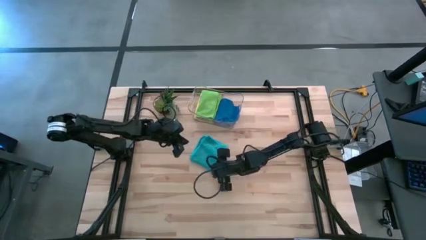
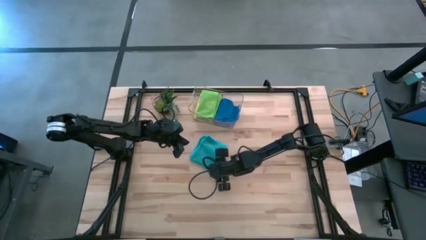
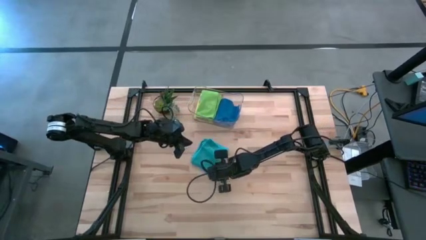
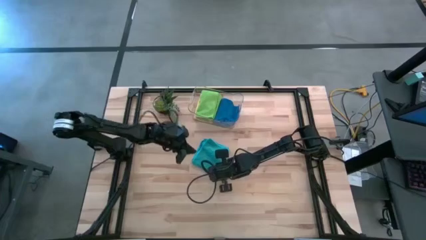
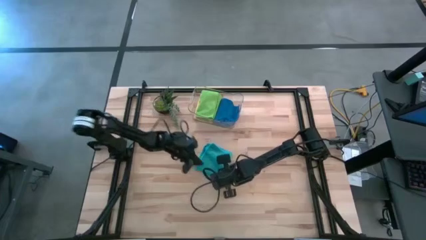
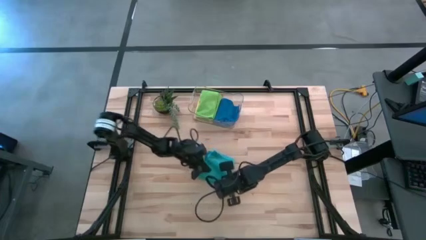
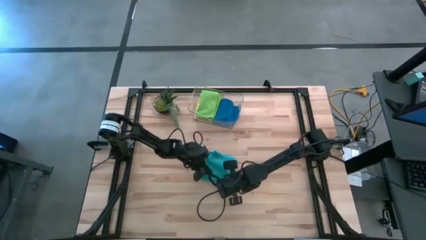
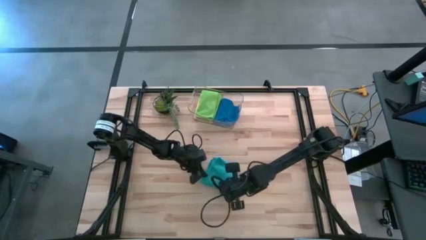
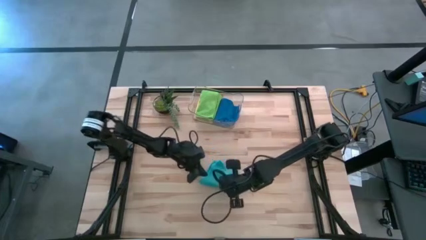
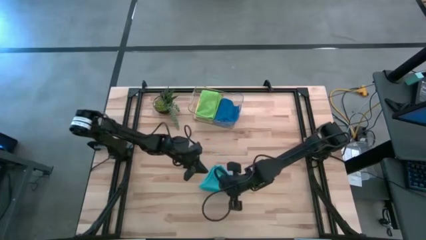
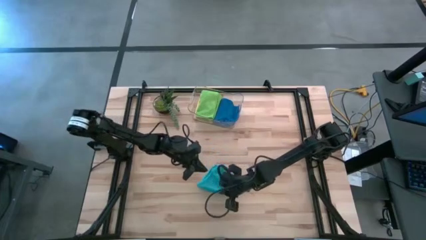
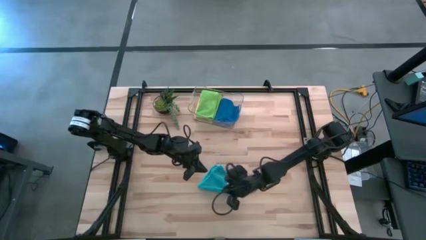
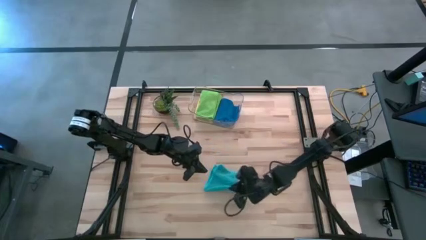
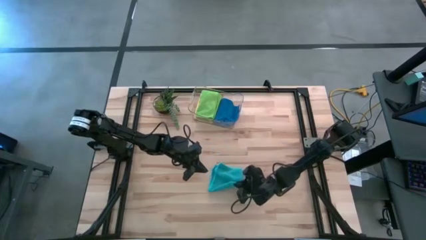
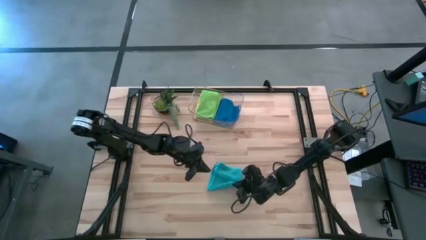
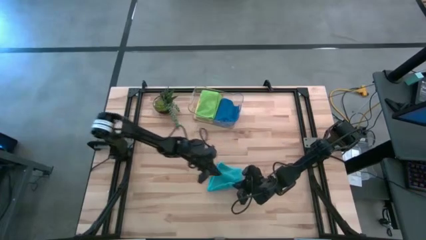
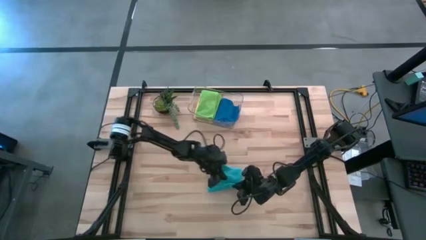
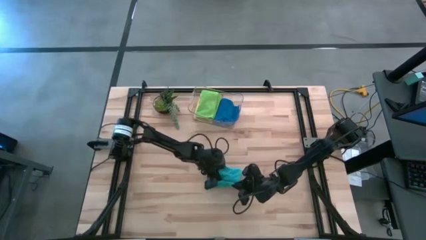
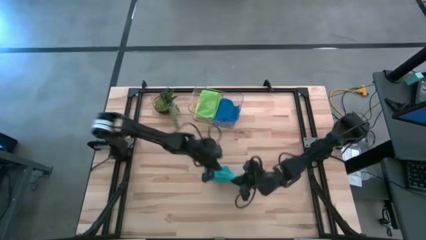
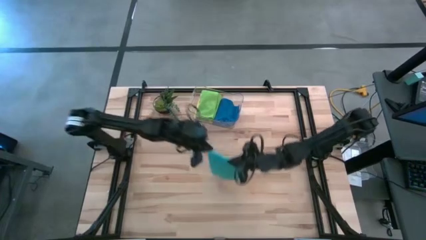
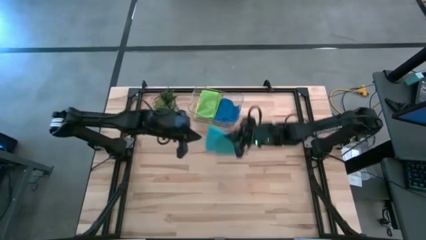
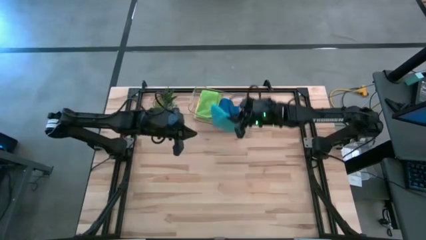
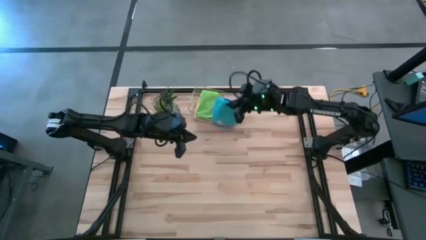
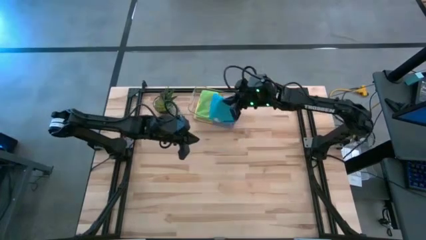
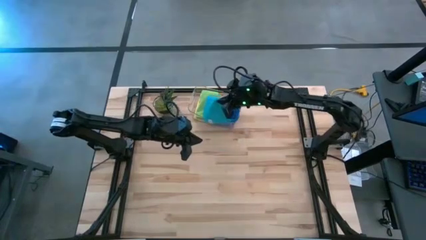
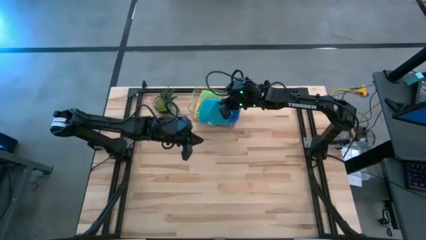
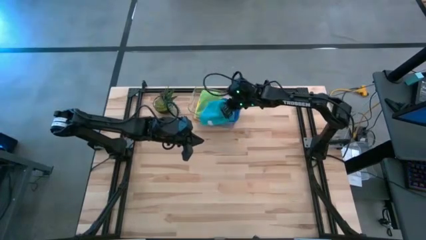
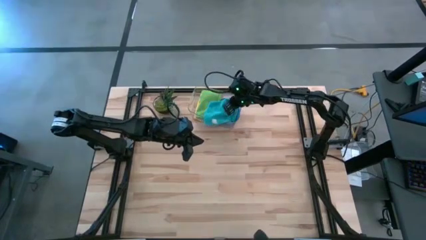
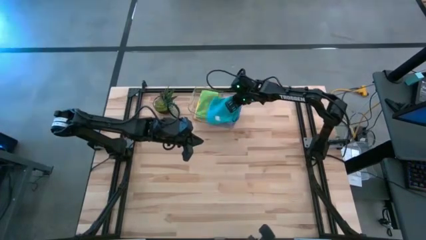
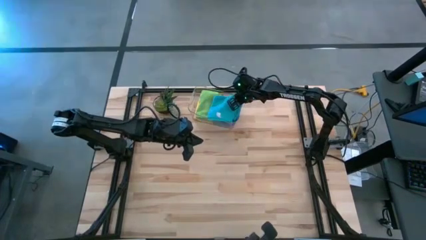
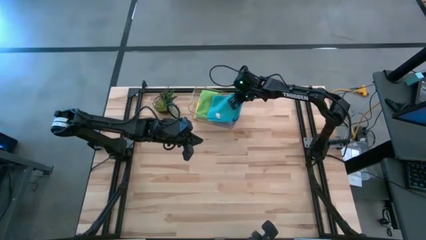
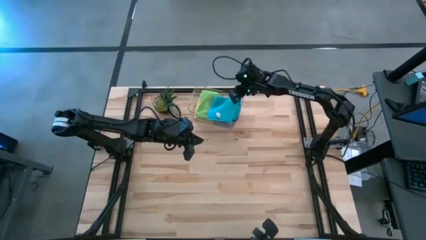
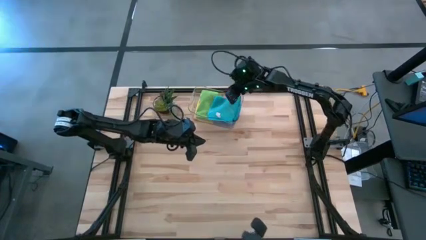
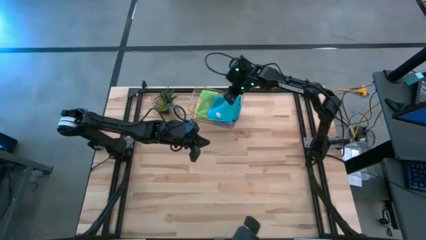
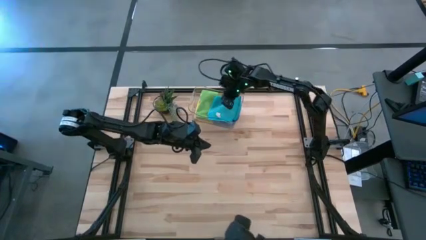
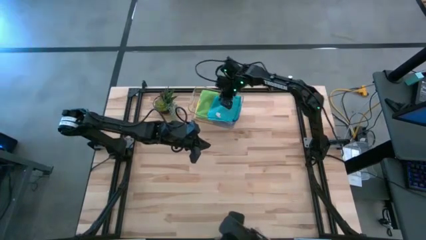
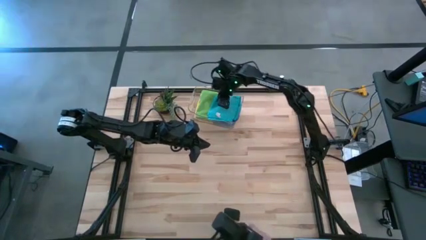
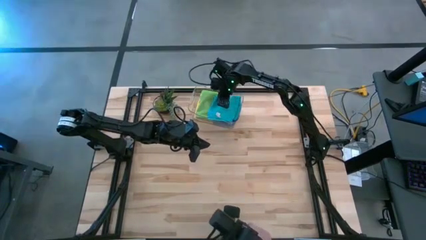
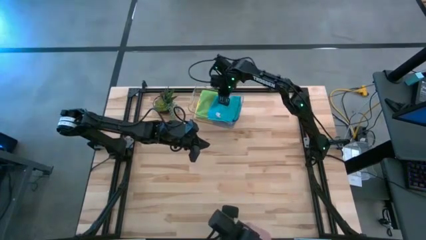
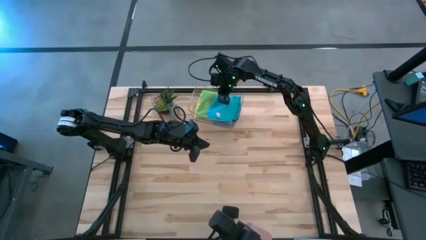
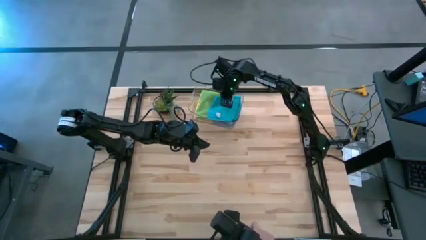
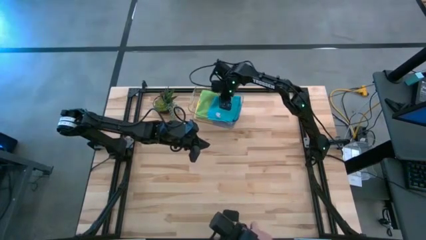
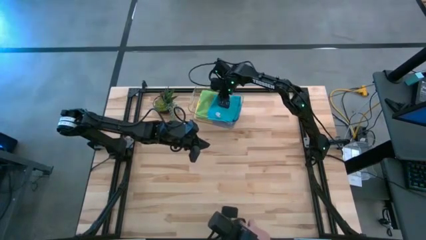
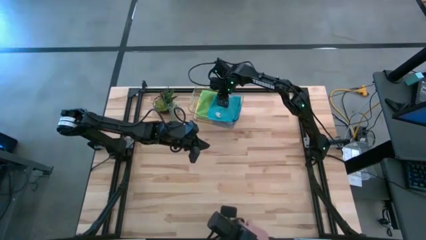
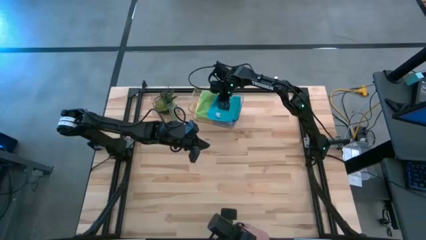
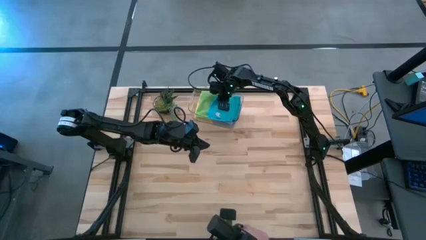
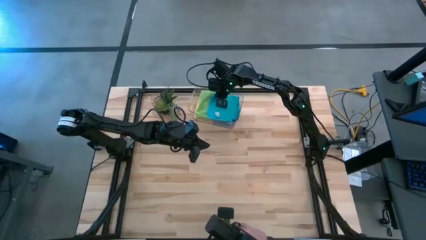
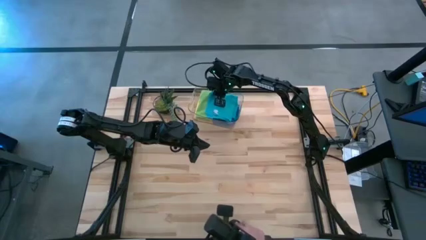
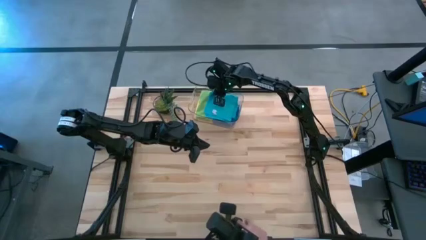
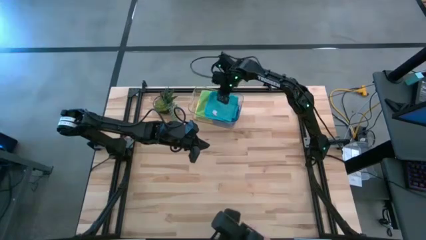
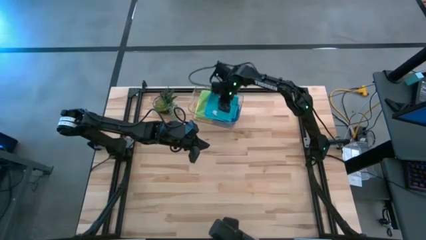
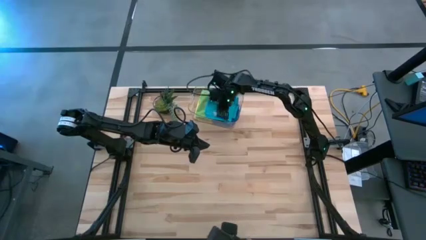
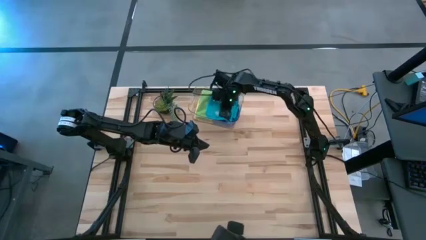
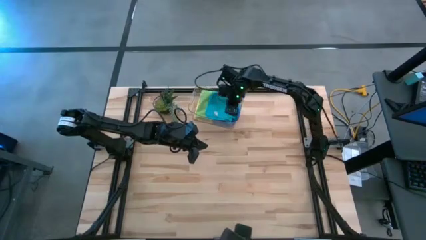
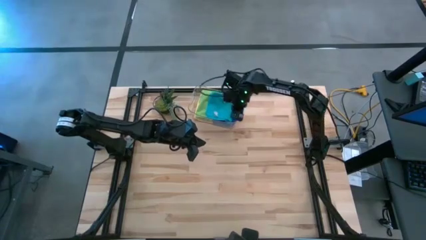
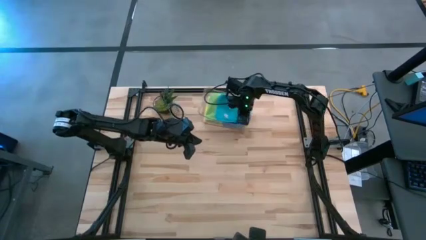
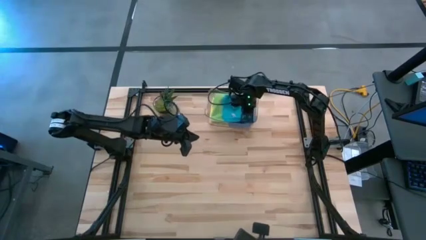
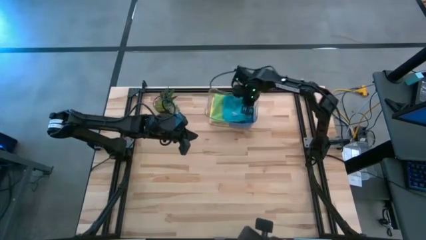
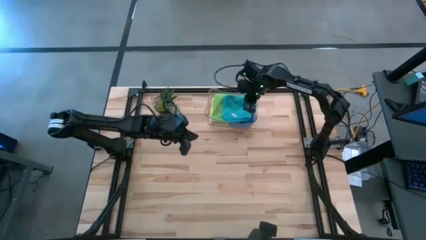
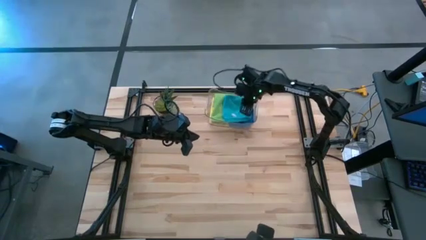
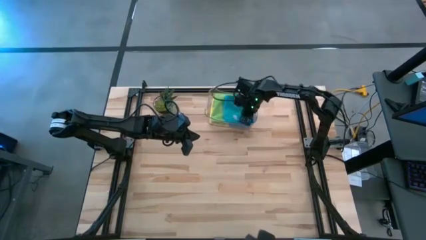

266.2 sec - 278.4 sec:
Task: Fold microfiber towels
Put the blue towel into the bin

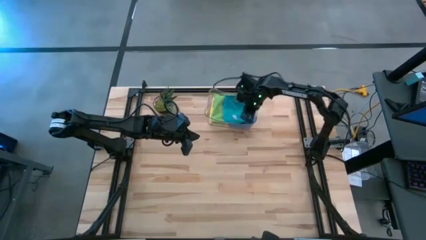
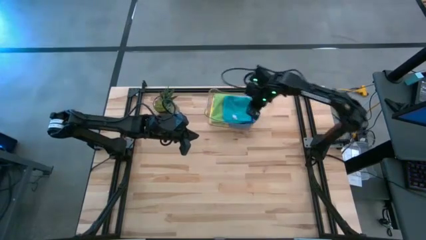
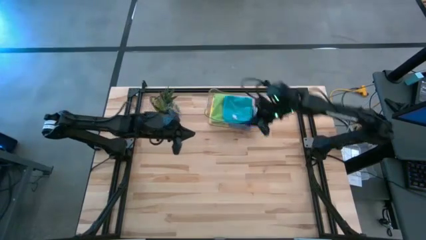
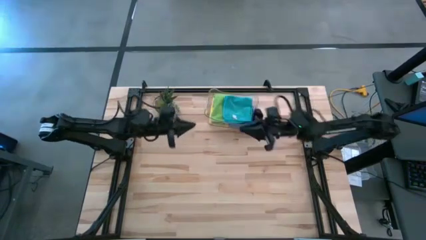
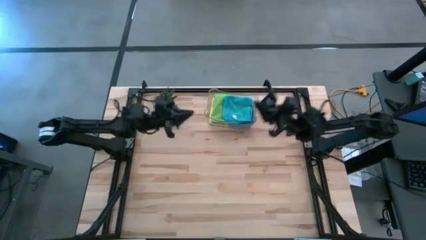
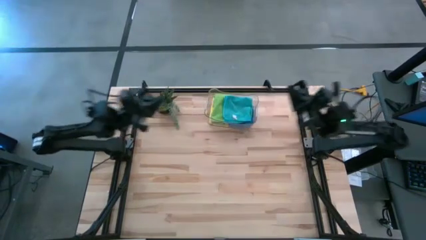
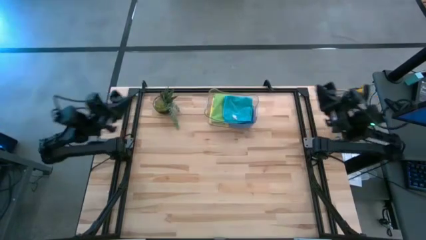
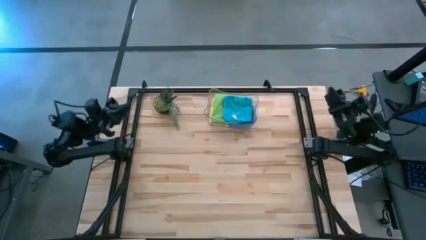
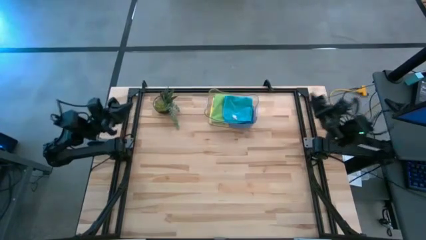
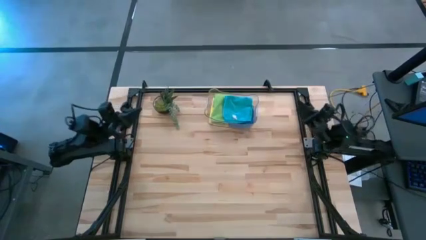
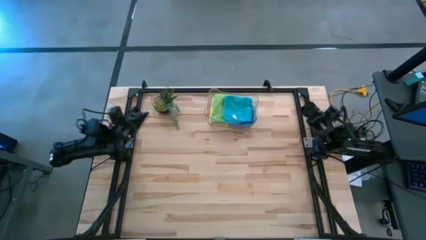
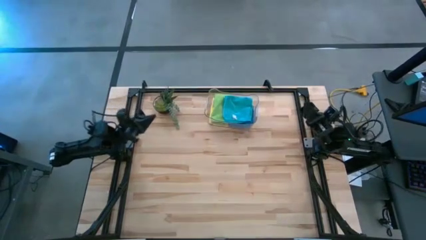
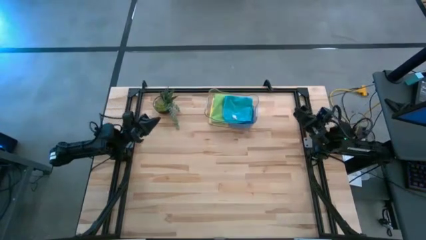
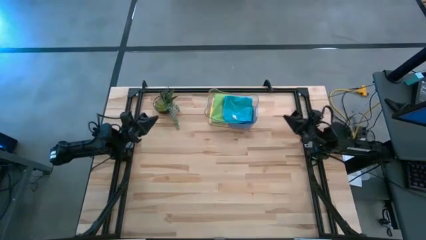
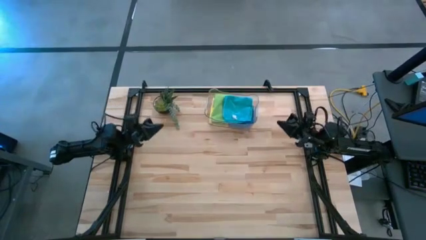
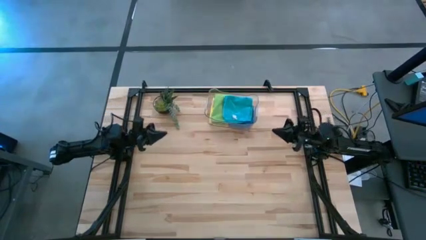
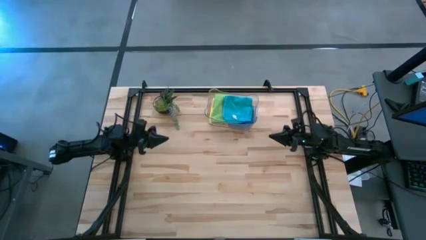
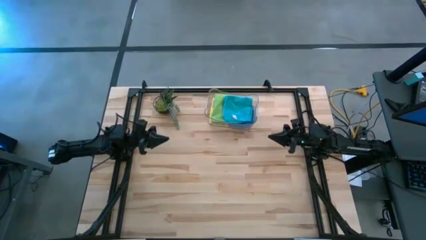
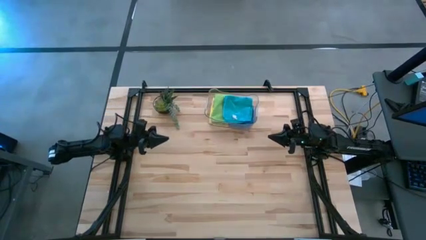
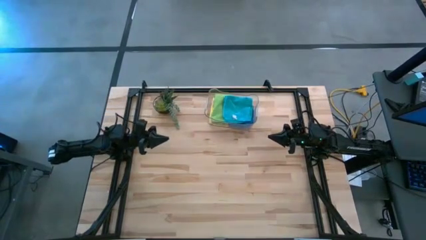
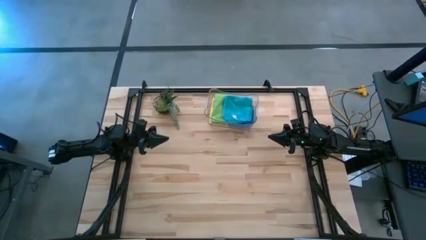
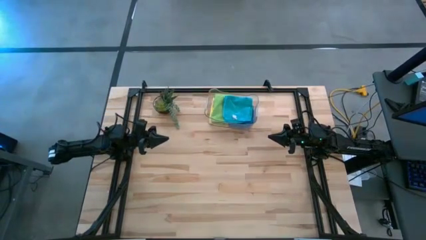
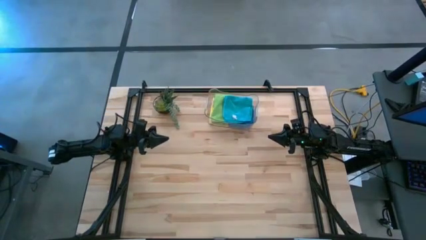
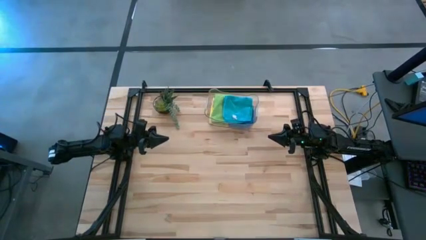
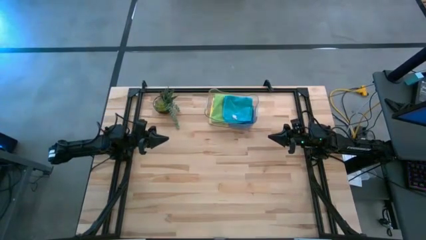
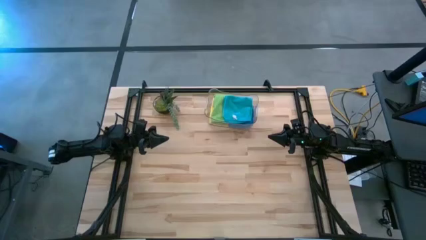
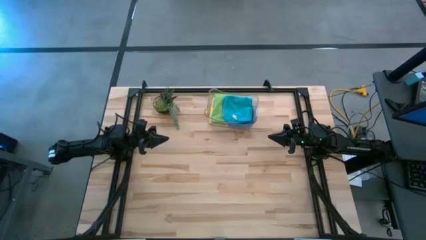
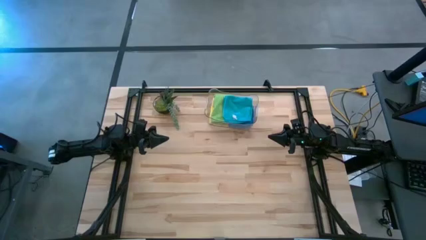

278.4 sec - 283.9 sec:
Return to Home Position
